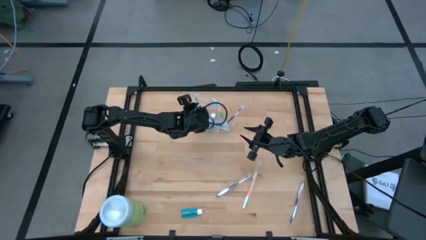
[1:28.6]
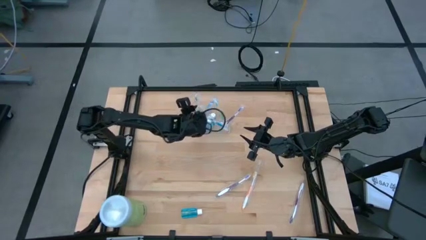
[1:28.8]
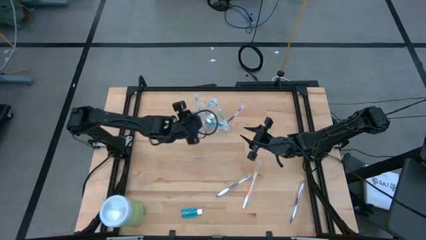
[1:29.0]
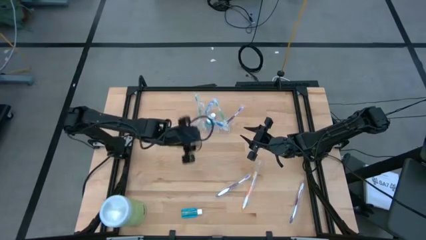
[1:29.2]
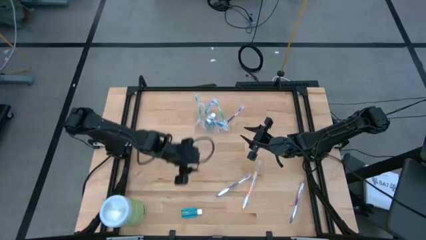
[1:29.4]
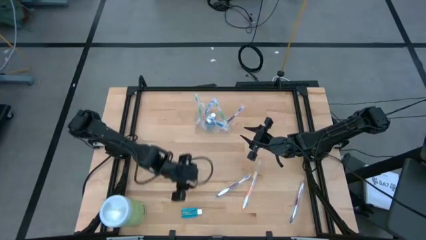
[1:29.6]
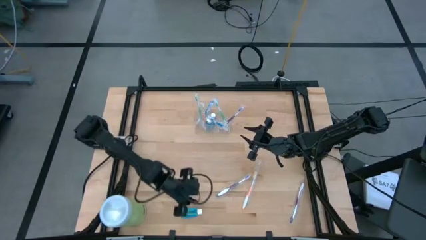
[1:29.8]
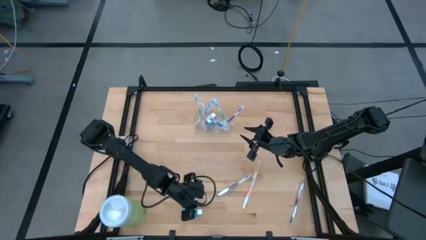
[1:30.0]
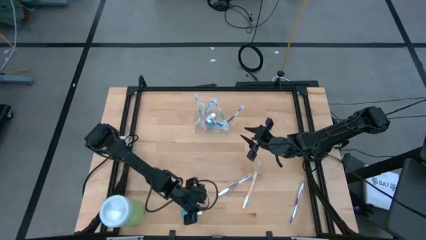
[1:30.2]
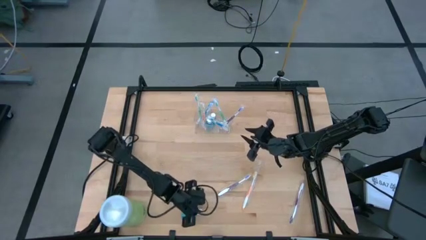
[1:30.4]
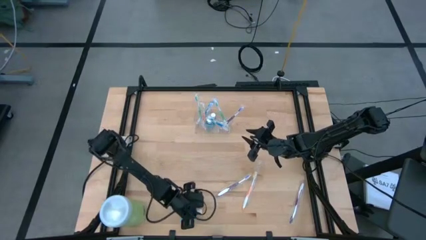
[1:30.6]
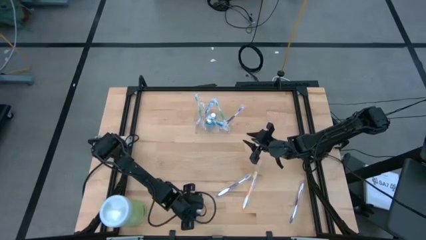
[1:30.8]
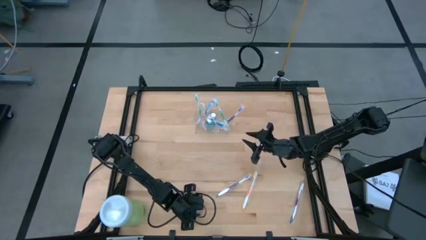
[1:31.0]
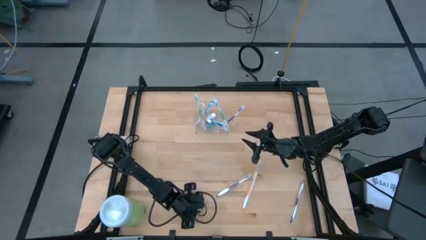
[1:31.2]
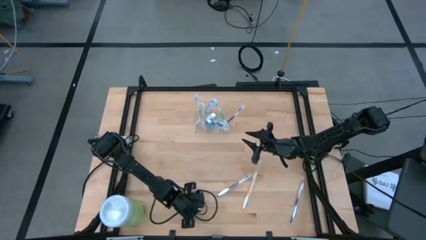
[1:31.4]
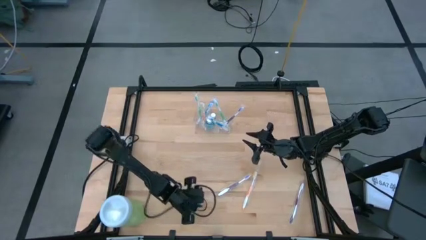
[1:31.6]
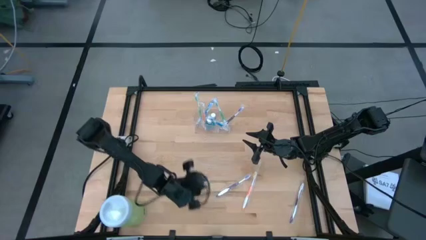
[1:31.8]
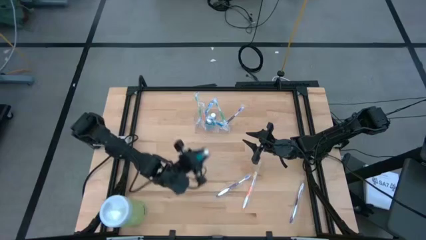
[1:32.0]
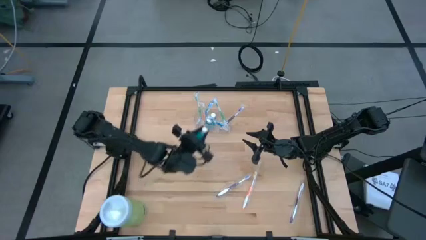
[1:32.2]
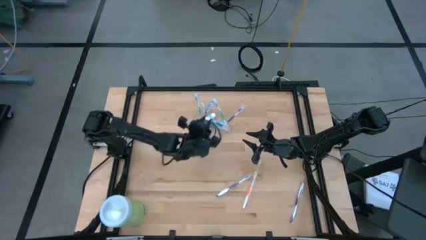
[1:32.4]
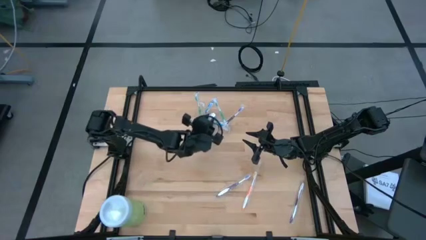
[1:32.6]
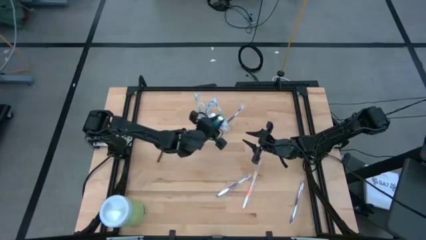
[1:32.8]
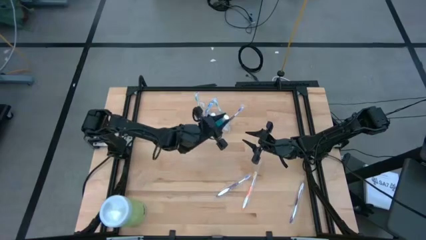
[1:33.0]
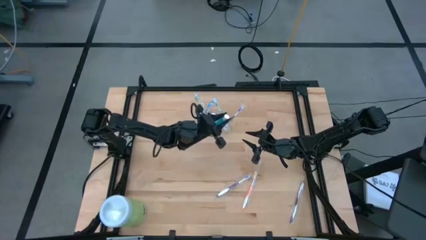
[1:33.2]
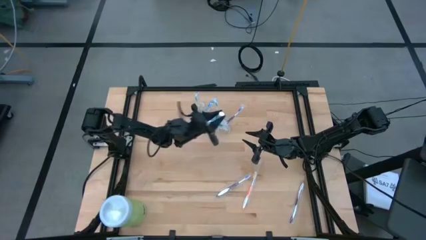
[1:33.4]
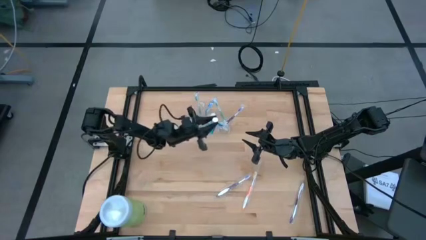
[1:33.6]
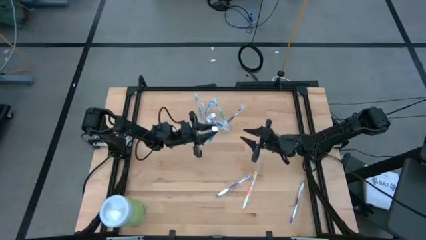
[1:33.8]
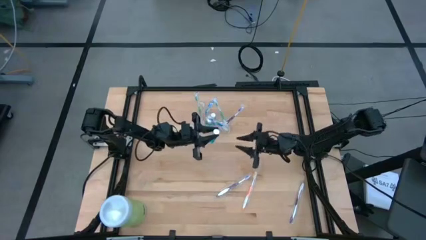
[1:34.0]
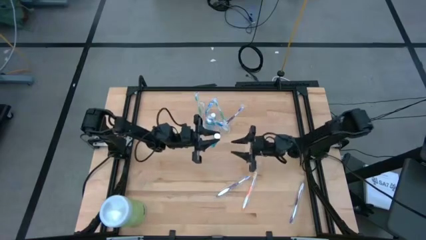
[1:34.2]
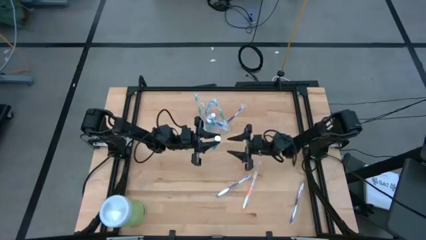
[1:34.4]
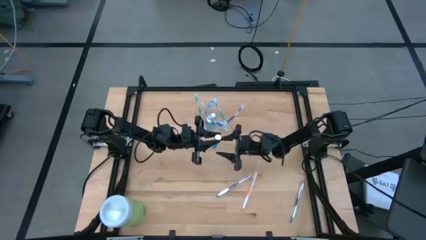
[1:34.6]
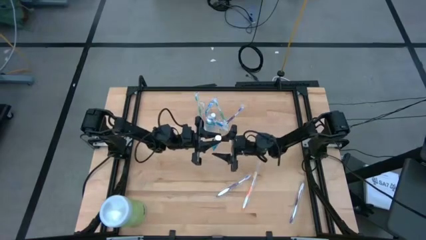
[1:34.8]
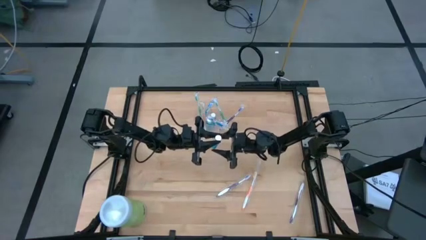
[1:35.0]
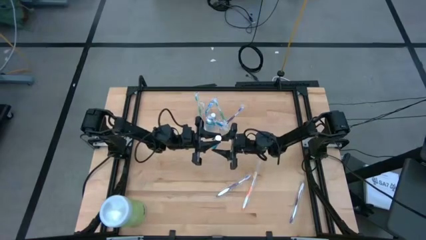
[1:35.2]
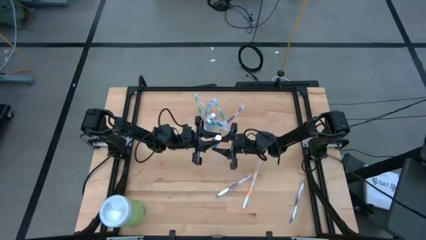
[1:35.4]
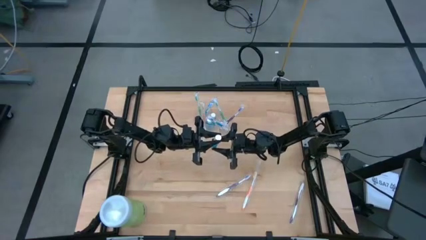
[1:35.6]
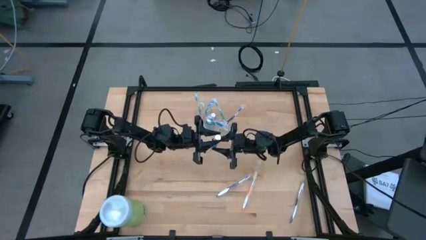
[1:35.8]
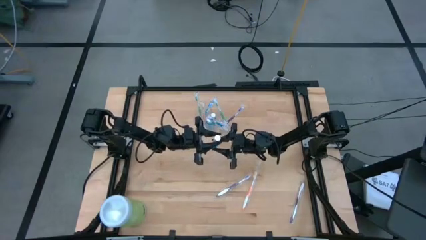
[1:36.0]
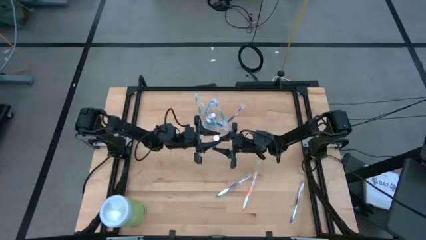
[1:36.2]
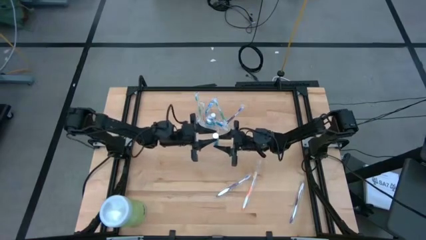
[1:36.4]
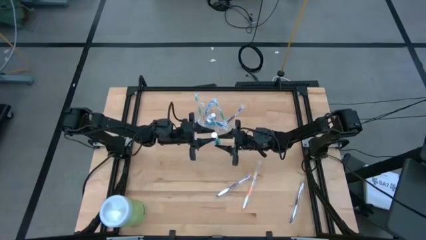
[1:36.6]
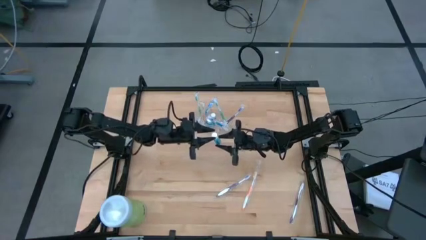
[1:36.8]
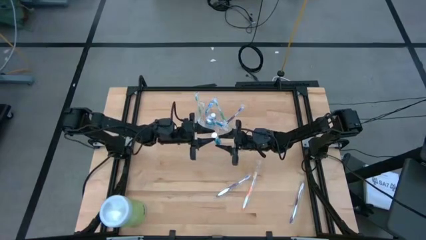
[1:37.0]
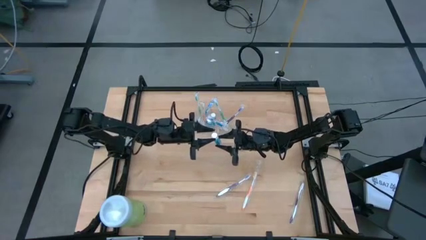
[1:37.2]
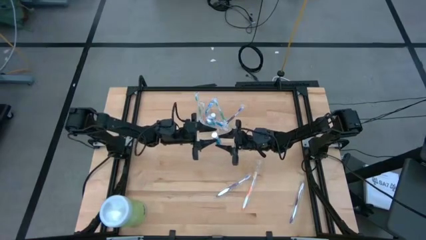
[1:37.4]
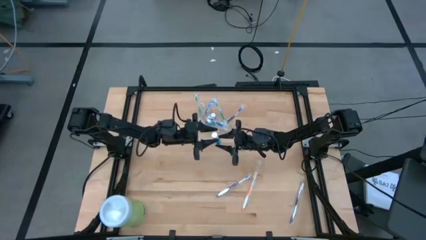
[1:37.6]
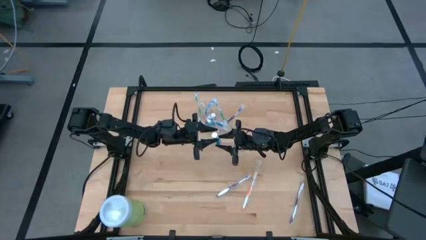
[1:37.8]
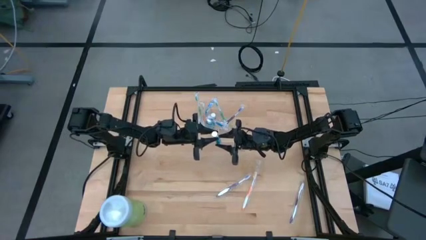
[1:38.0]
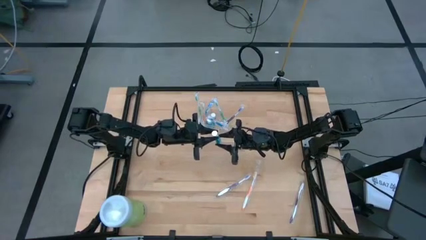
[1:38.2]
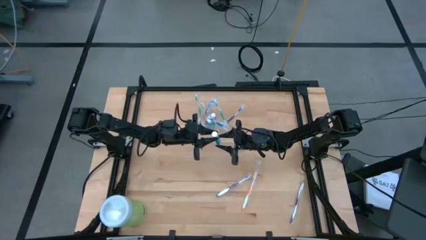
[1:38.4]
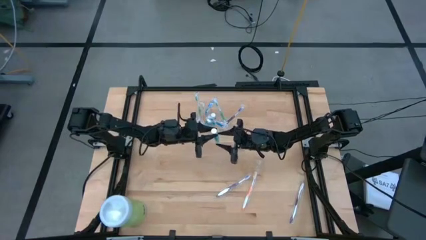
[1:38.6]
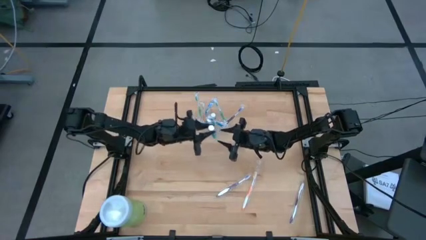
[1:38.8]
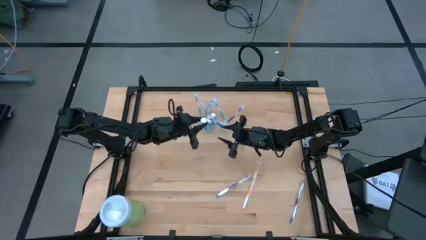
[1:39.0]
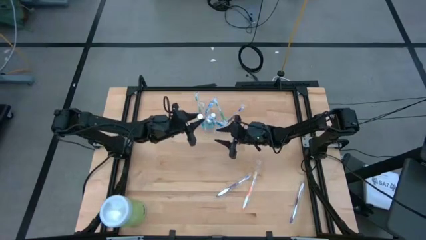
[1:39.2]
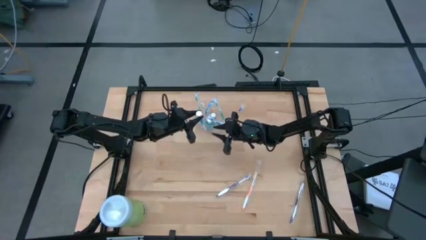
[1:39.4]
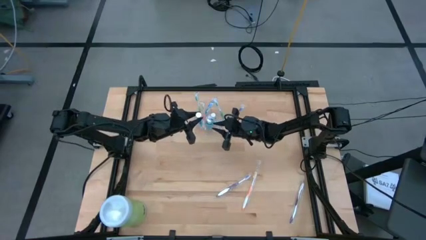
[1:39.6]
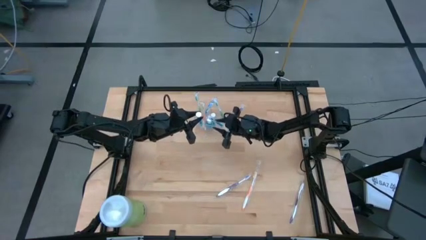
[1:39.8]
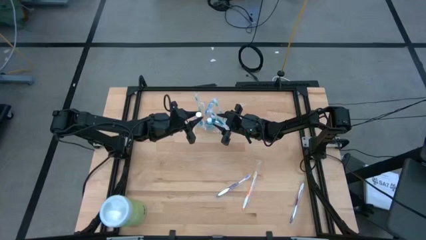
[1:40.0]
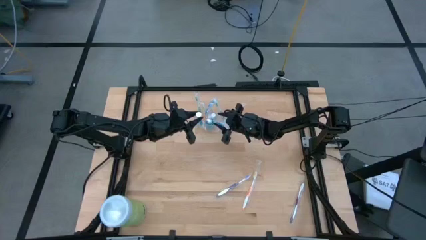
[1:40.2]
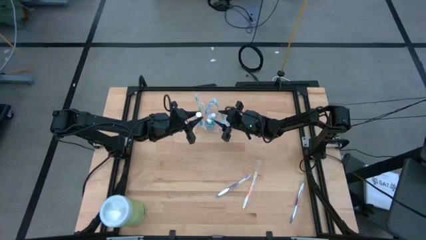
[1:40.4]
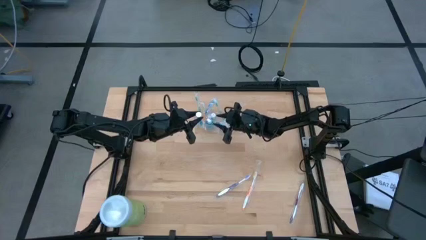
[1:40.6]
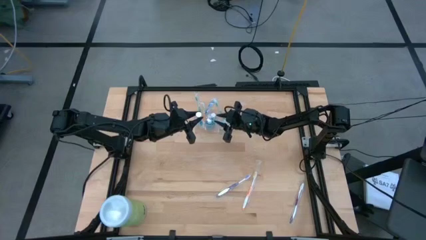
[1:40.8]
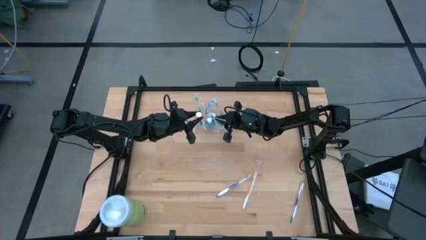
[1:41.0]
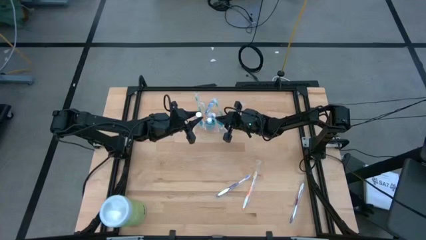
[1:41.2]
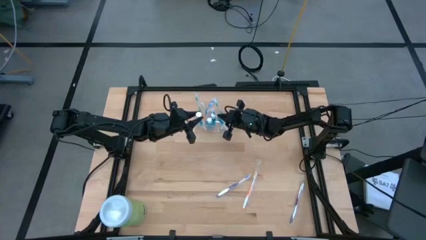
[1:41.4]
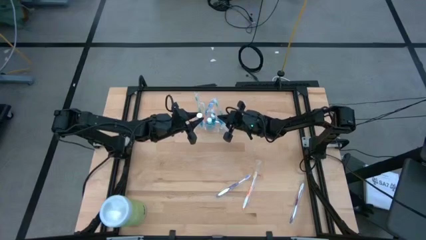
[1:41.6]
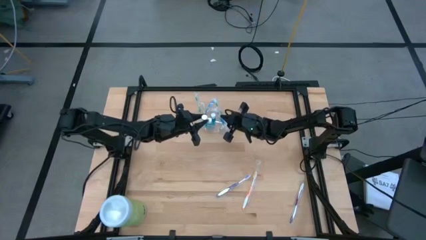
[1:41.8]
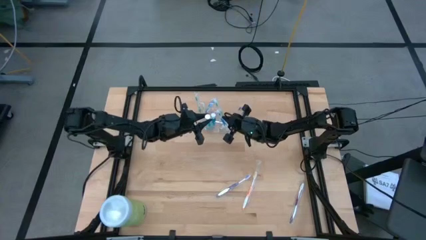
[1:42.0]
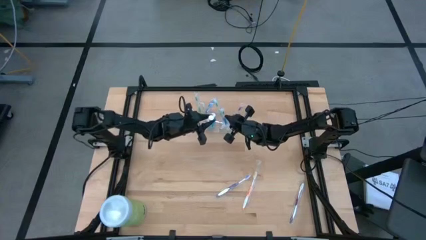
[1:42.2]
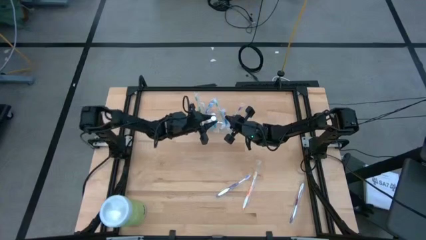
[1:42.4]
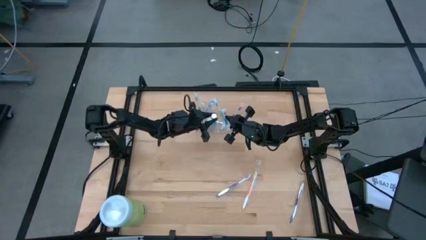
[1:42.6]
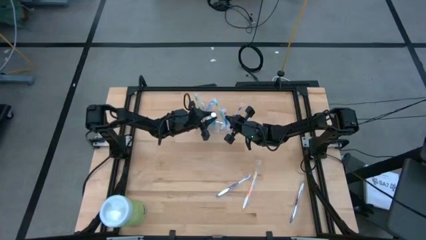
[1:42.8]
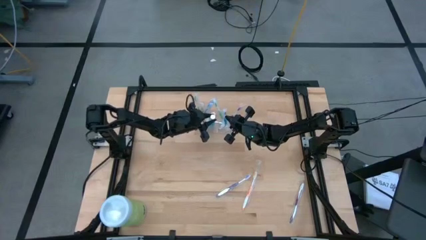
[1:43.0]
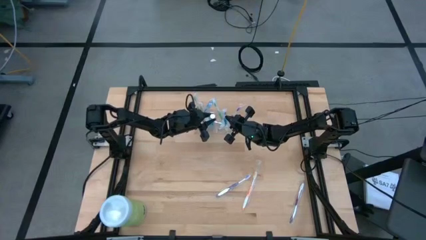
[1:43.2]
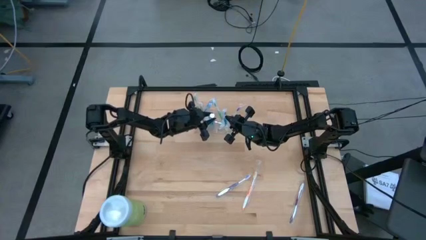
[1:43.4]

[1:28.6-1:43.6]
Task: Pick & Place toothbrushing station
Put the mouthwash into the middle section of the transparent organizer
